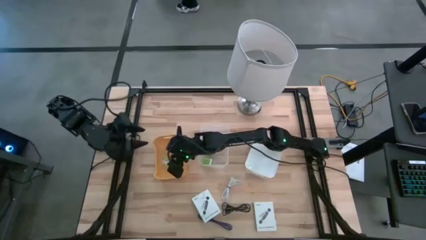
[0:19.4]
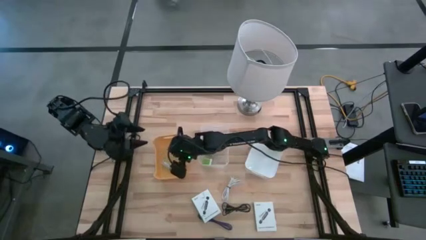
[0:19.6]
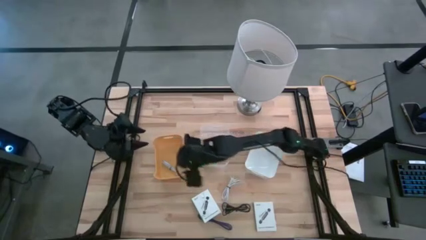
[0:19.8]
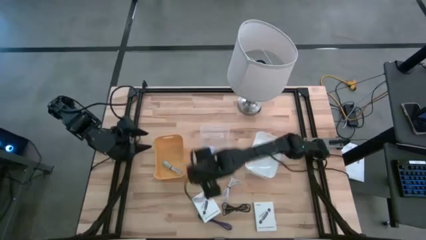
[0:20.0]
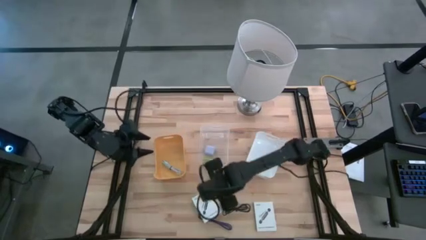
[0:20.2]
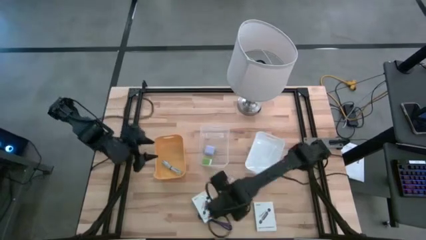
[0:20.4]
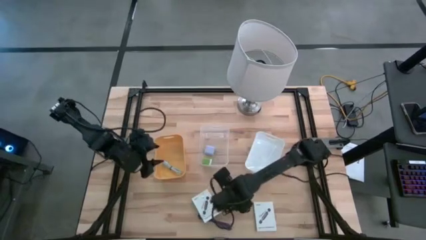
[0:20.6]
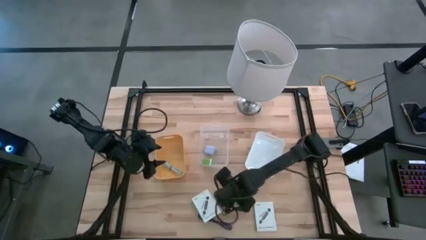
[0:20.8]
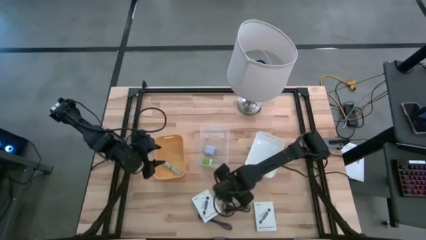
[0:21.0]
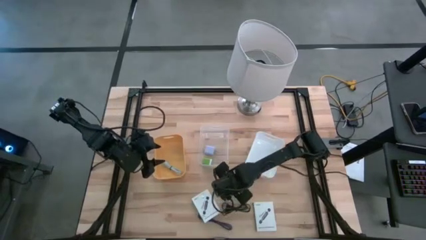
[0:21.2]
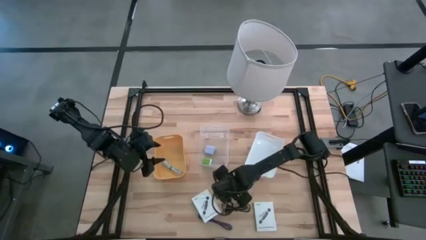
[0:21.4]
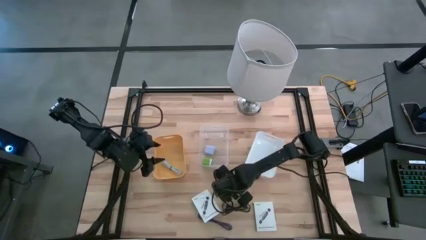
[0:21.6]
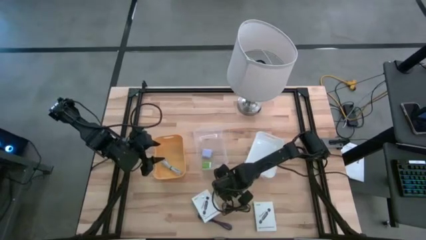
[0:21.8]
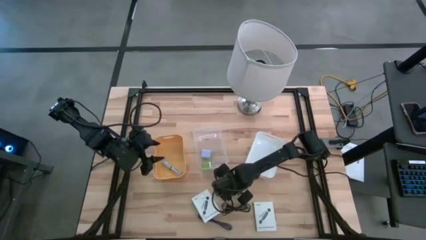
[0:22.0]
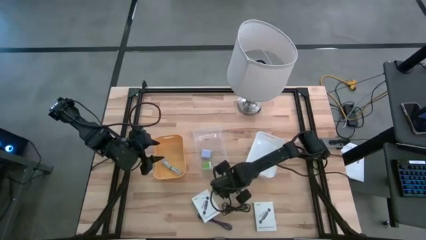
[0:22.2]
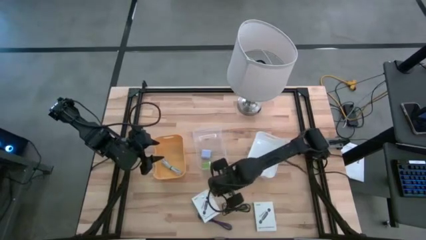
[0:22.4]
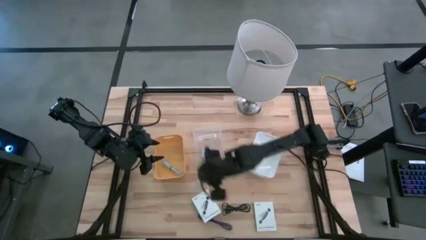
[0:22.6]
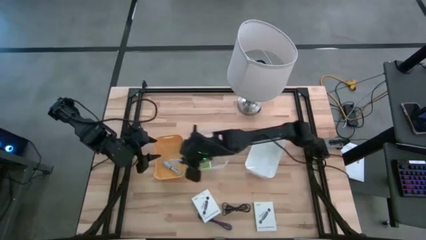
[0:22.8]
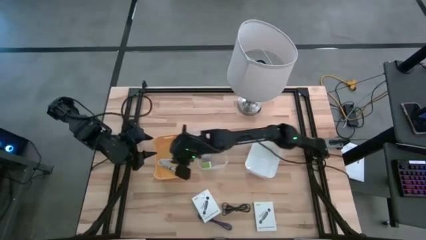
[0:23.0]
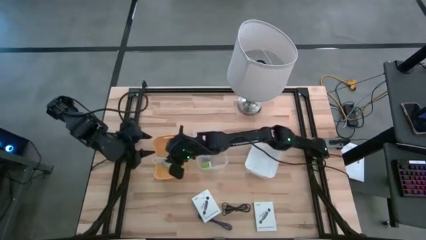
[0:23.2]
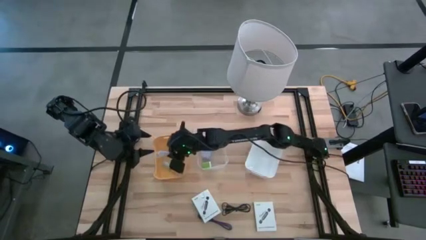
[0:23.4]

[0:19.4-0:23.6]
Task: Pick and place items into bin
Put the white charger cable into the yellow bin

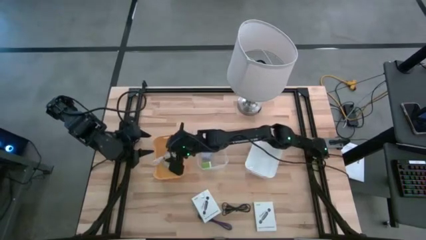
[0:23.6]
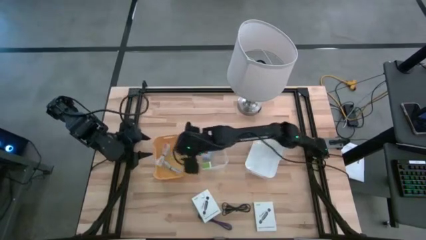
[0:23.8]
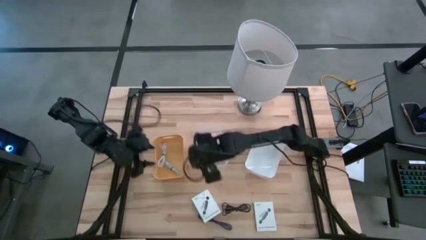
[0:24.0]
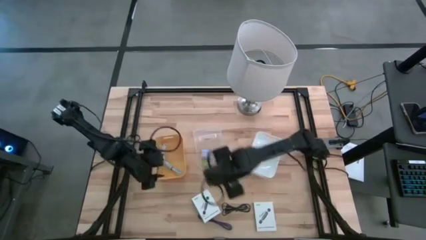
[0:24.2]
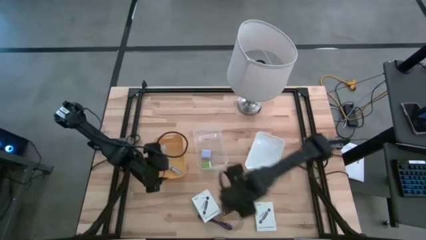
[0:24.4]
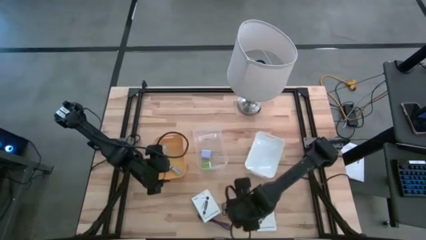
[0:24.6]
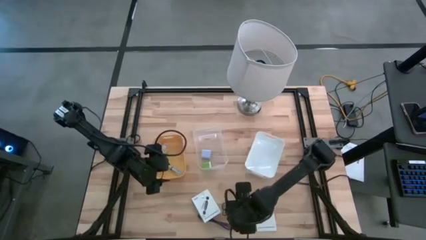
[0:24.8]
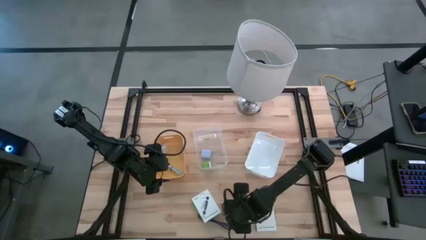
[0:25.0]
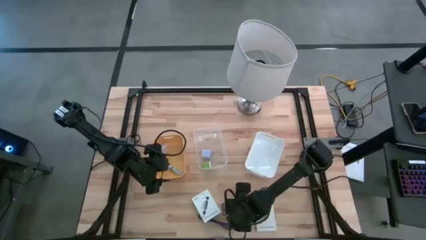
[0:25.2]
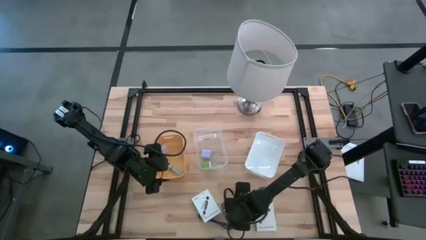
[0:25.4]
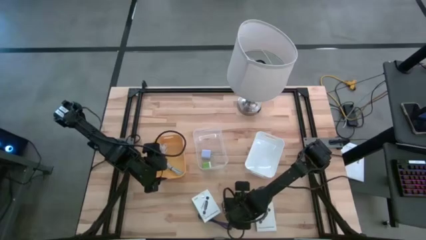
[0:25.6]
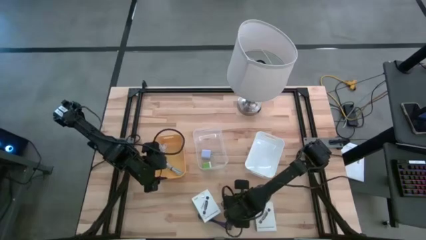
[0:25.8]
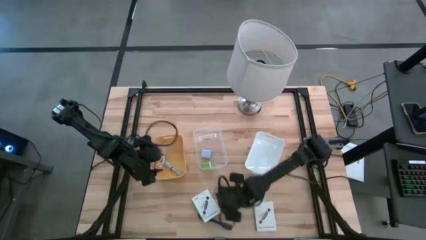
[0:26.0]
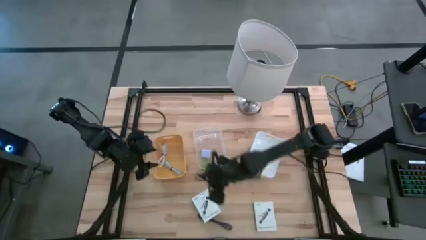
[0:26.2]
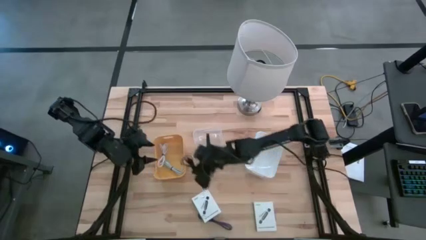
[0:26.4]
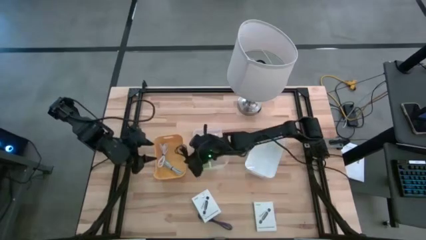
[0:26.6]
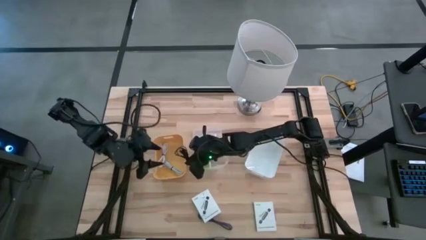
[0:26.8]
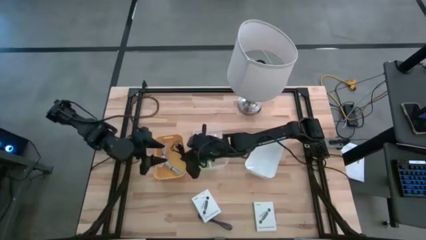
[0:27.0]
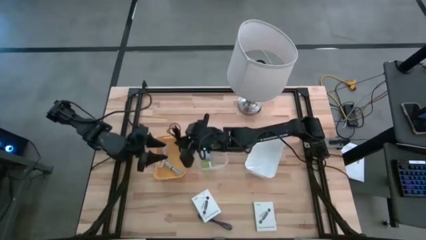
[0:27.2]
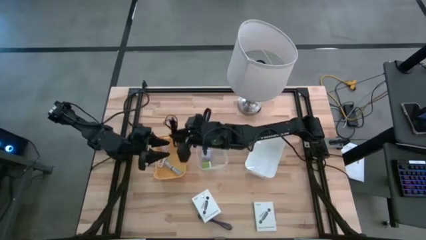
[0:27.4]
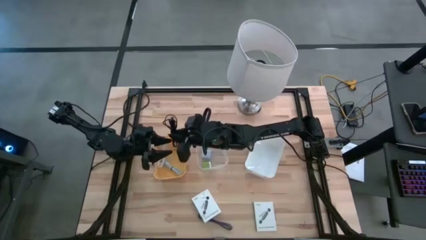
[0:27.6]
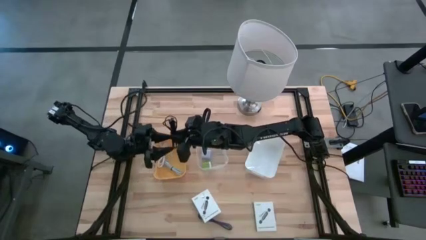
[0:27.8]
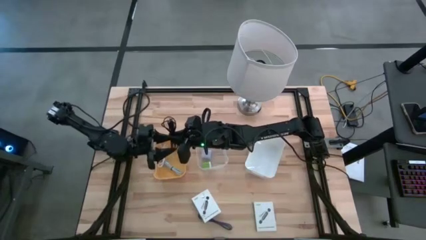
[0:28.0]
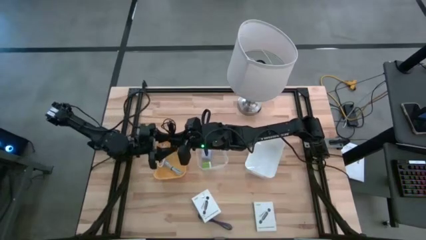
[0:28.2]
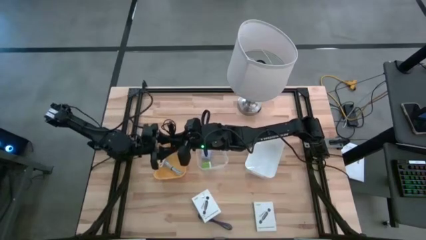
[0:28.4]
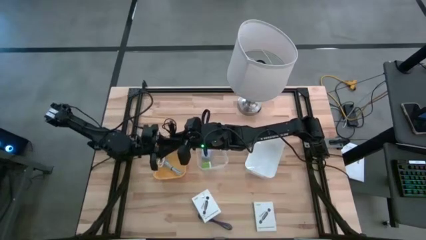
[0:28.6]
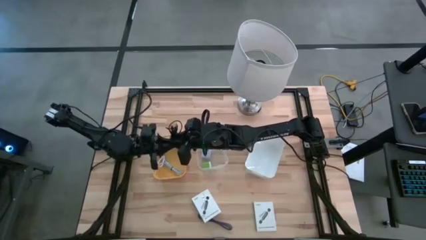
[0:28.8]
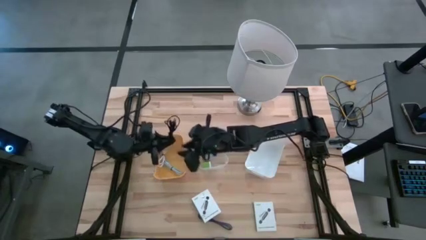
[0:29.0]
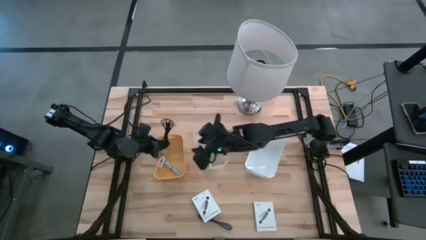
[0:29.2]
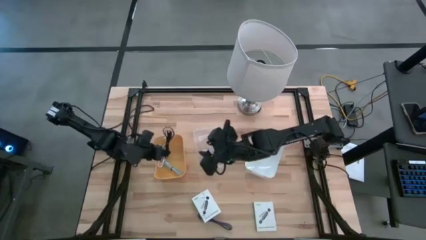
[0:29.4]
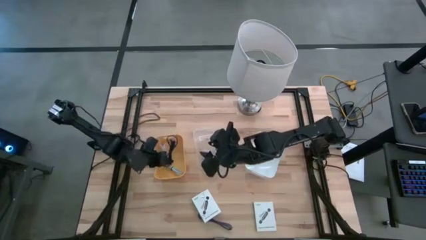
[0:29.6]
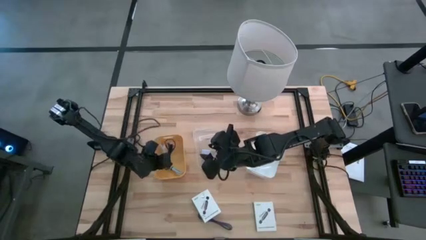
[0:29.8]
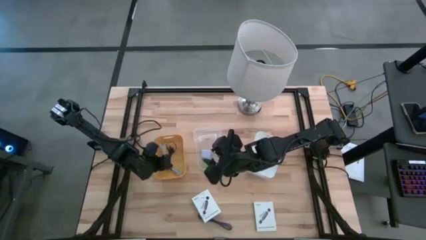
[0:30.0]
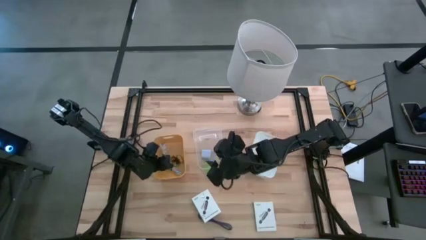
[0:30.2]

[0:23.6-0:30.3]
Put the black charger cable into the yellow bin

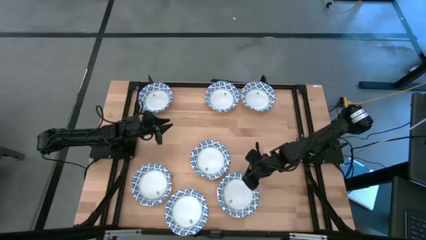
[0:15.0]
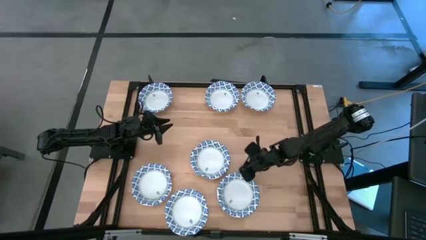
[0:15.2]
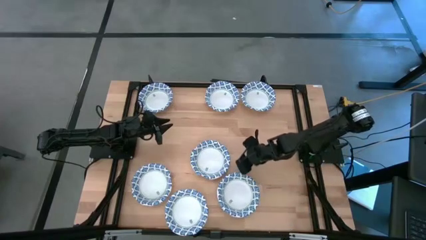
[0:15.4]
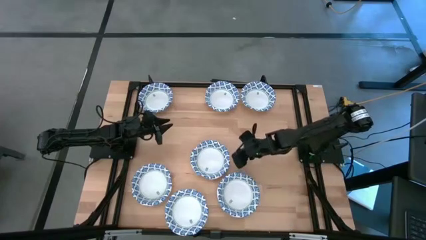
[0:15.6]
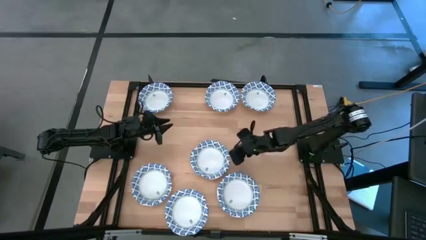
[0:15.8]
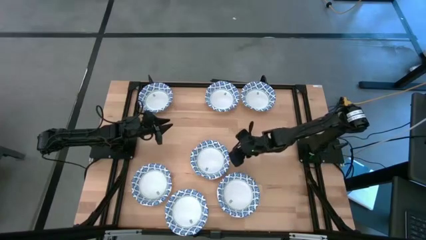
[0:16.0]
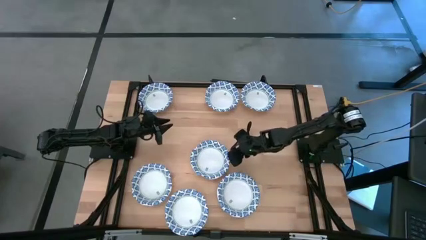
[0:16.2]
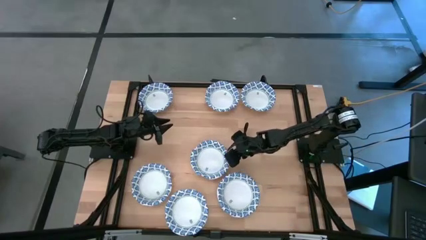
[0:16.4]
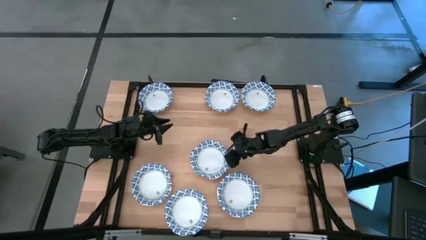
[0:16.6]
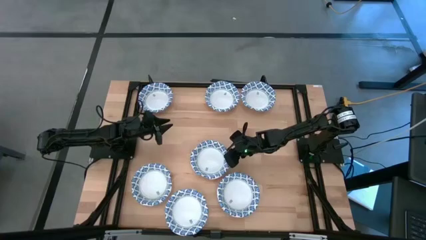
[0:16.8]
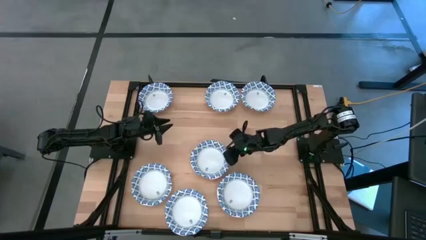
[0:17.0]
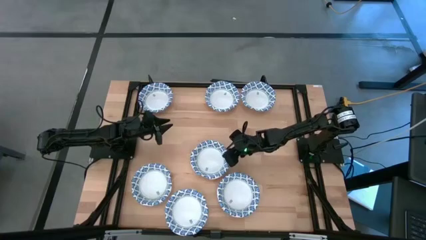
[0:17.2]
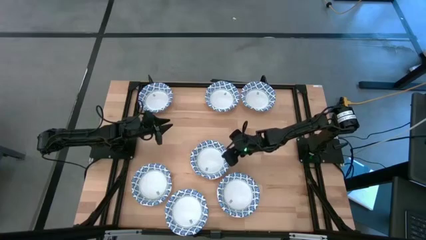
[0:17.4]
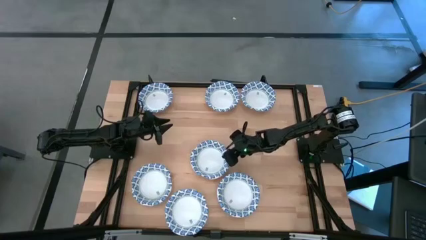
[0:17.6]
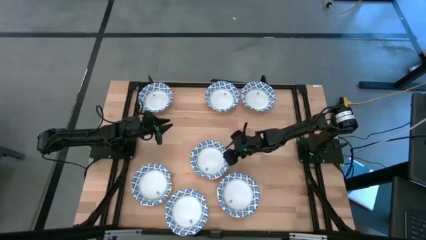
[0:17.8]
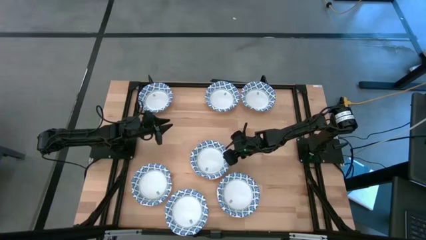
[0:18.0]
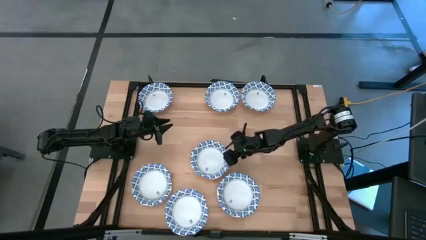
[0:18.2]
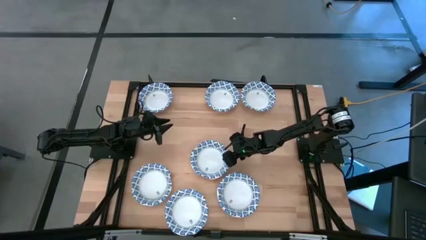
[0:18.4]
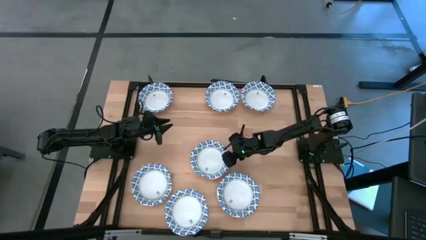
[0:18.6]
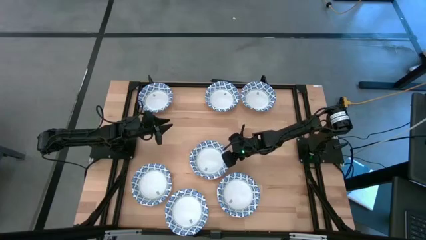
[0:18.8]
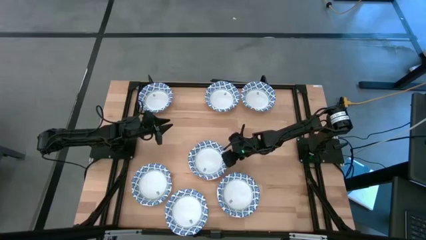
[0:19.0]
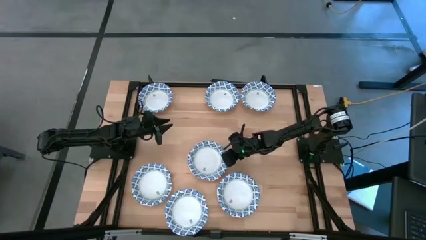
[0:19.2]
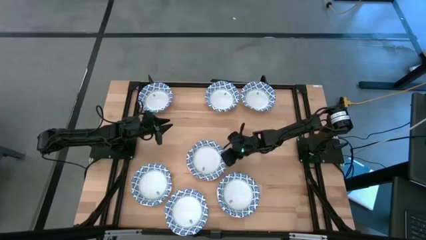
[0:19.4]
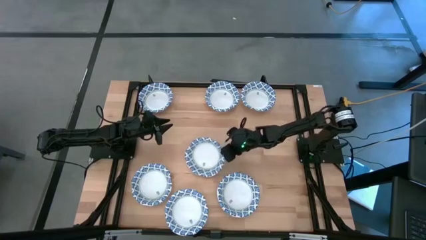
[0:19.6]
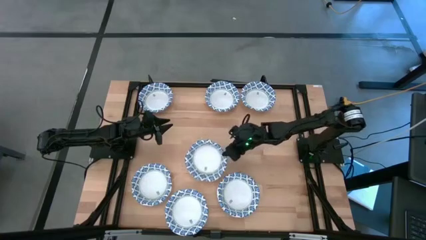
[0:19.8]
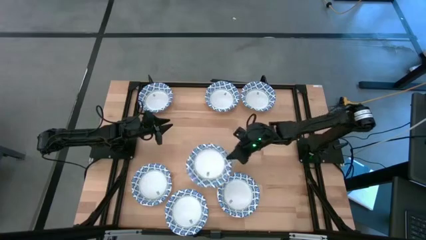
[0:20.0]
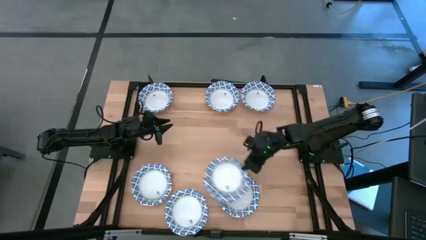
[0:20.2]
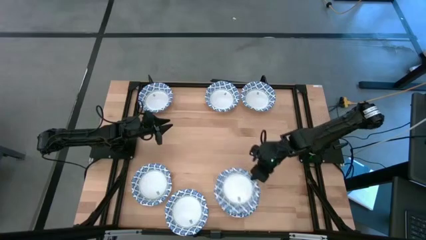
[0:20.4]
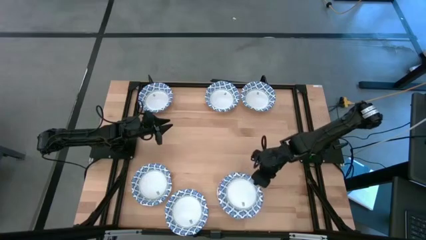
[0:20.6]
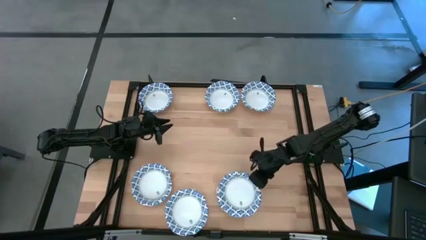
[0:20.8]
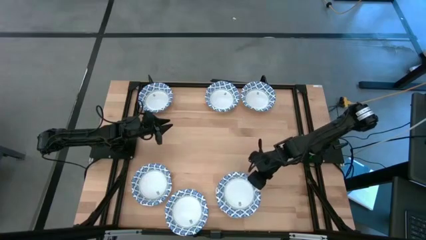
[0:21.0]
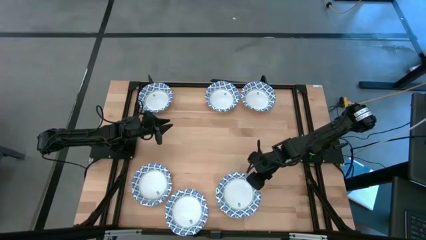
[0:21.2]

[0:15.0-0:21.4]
Task: Nest bowls inside each other
Stack the blue patterned bowl on the blue patterned bowls
